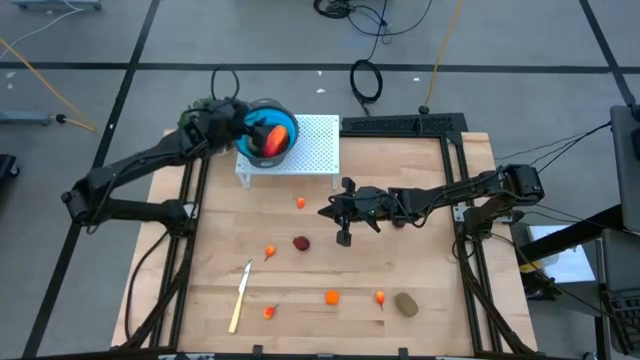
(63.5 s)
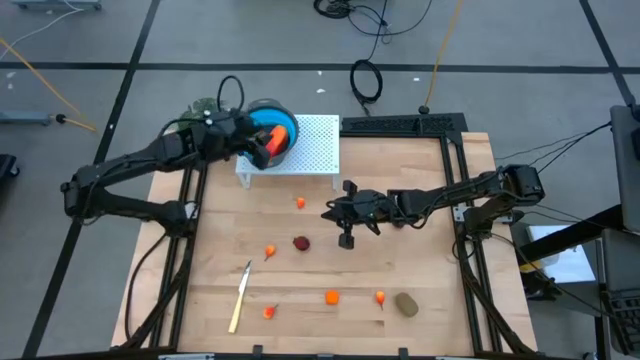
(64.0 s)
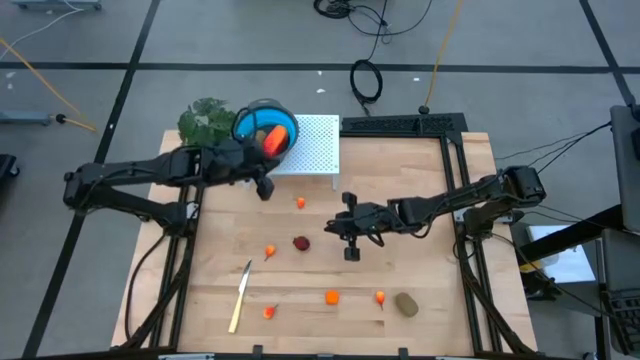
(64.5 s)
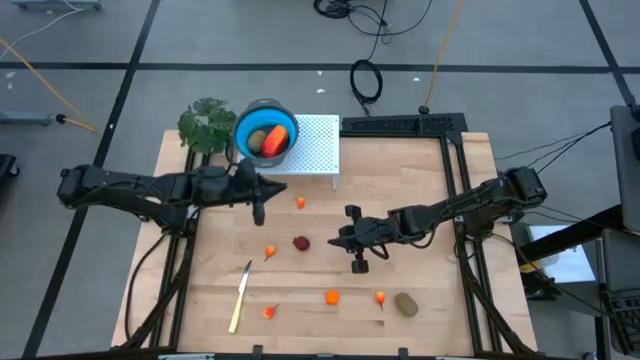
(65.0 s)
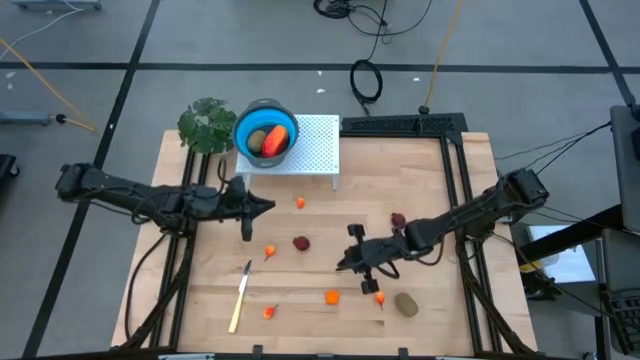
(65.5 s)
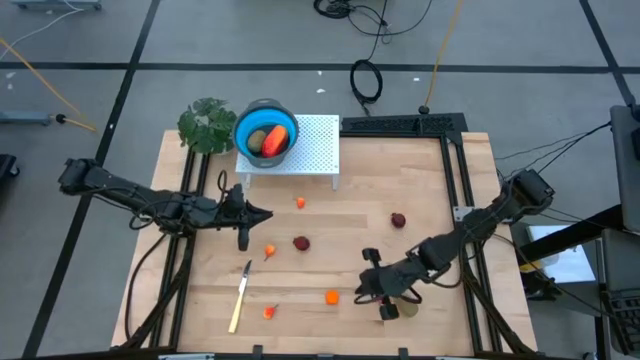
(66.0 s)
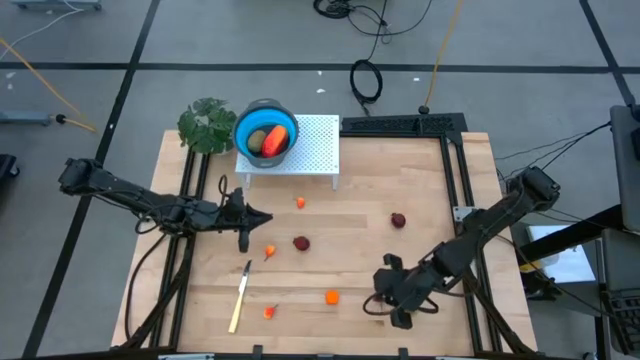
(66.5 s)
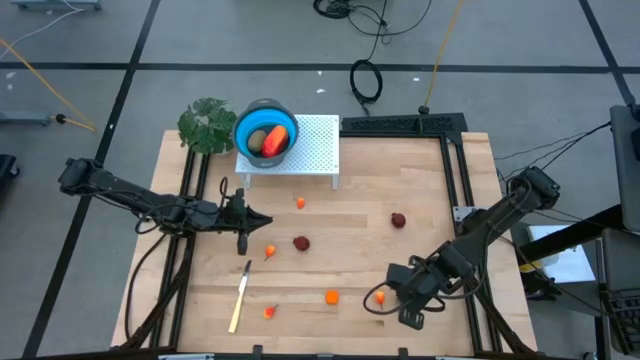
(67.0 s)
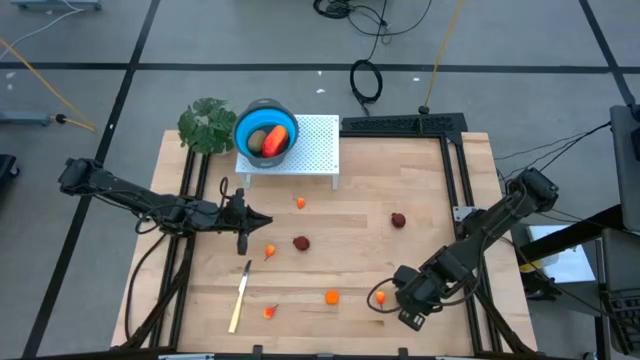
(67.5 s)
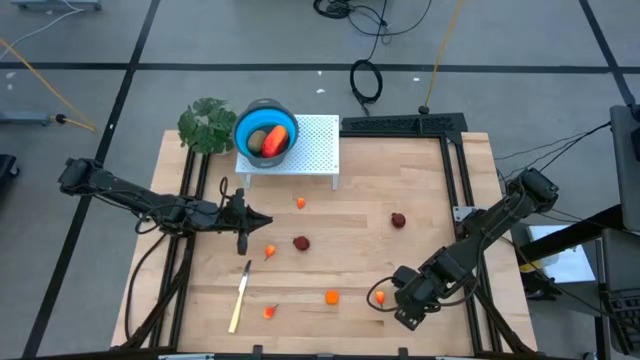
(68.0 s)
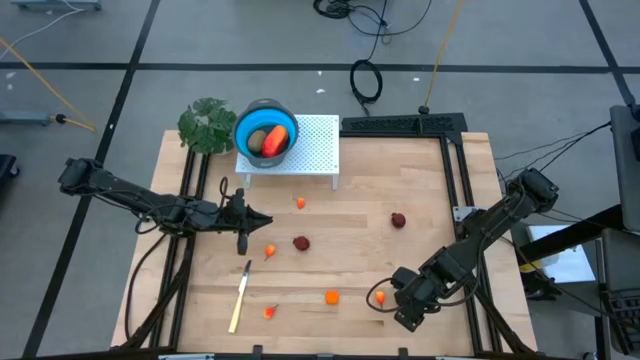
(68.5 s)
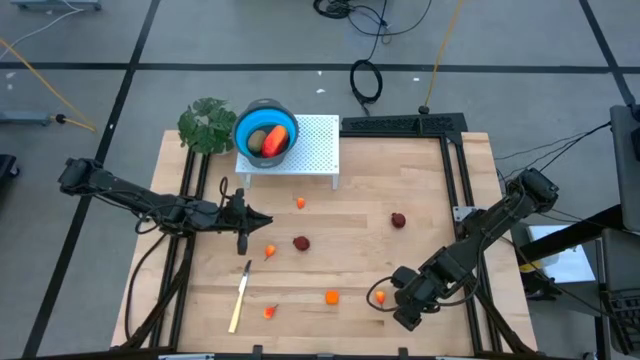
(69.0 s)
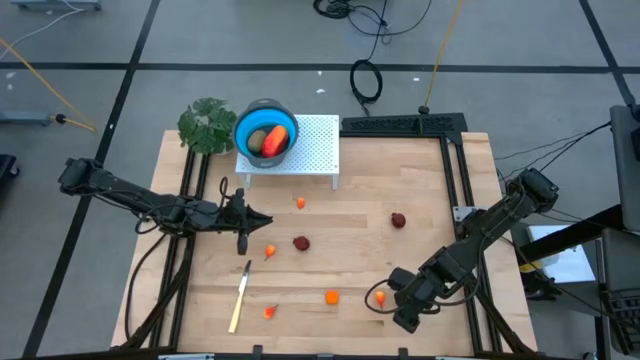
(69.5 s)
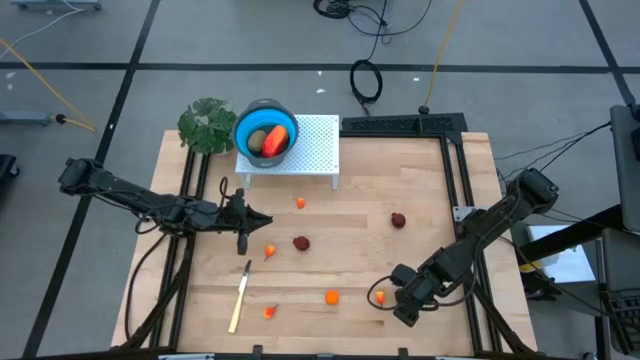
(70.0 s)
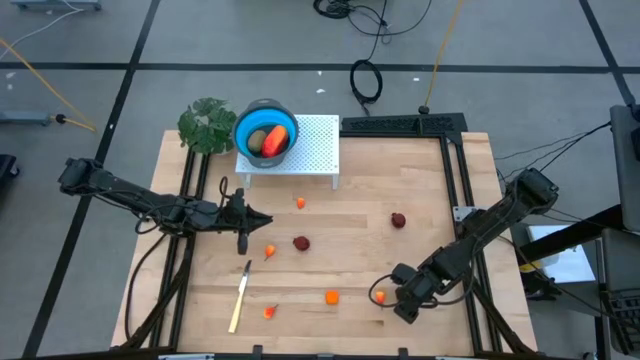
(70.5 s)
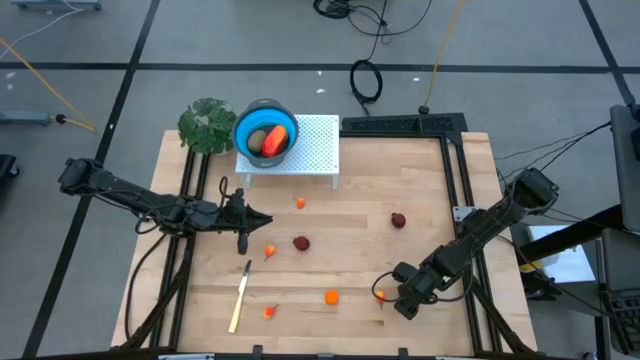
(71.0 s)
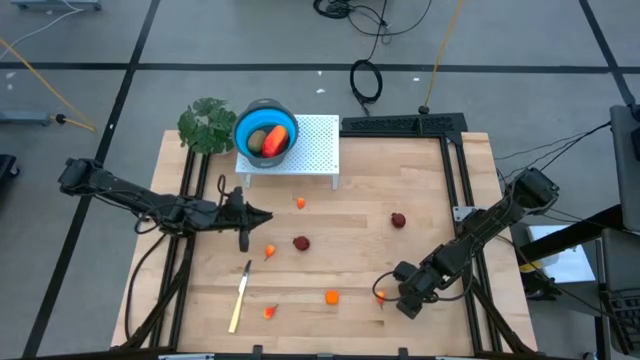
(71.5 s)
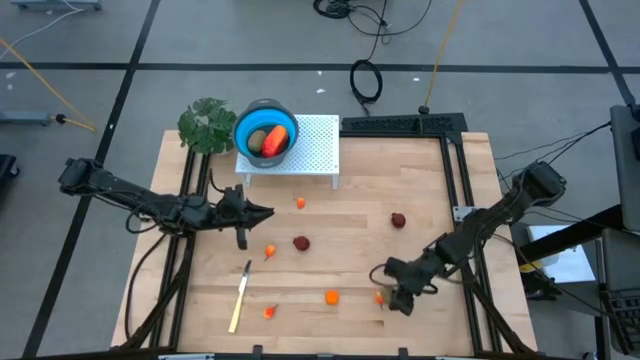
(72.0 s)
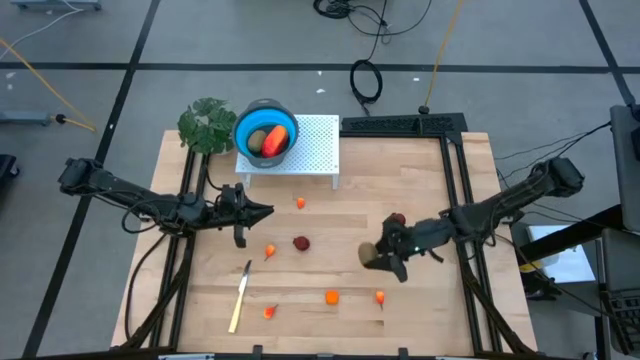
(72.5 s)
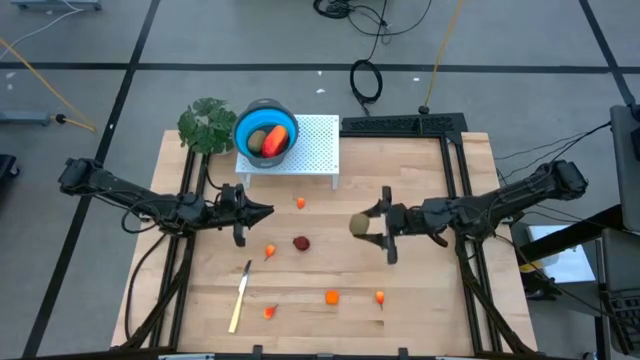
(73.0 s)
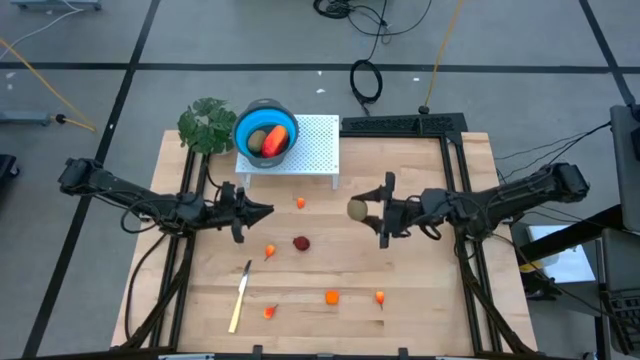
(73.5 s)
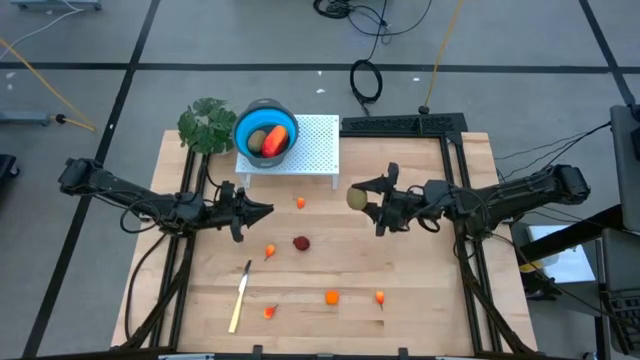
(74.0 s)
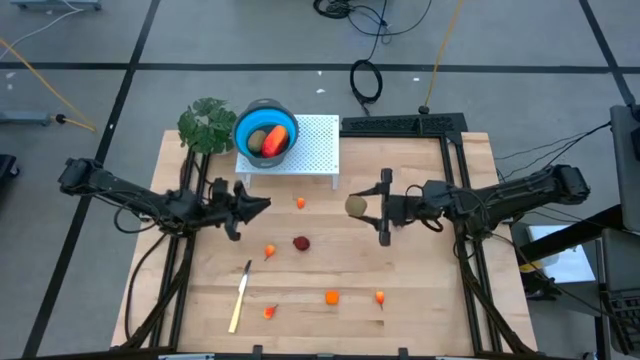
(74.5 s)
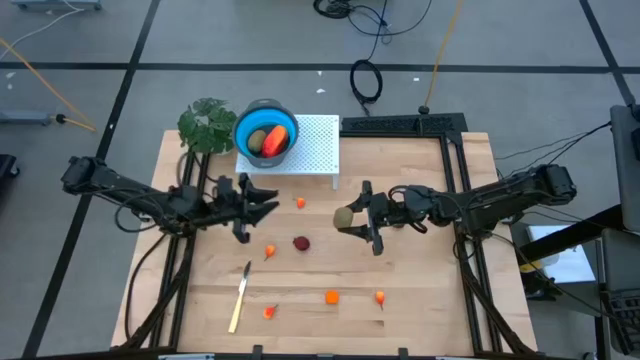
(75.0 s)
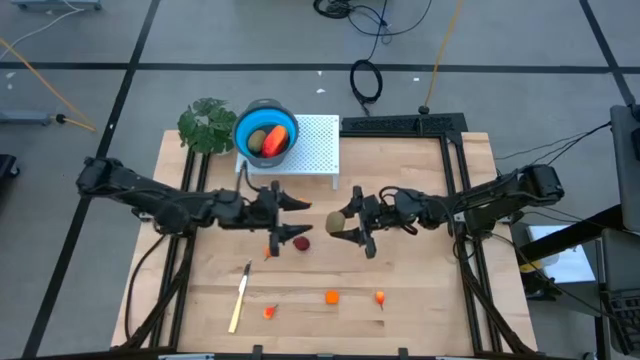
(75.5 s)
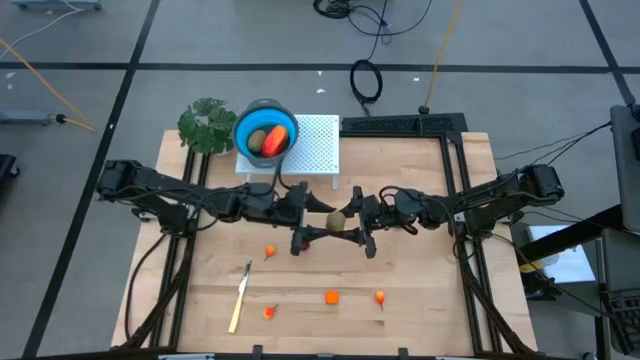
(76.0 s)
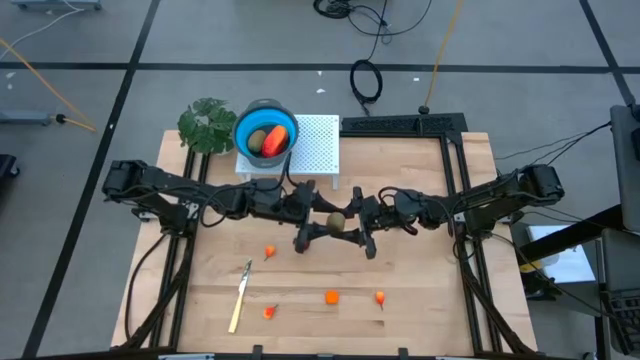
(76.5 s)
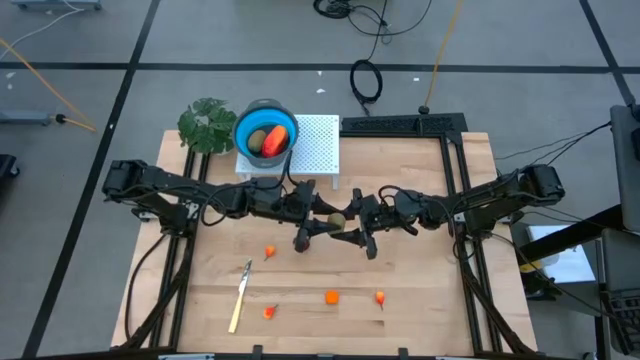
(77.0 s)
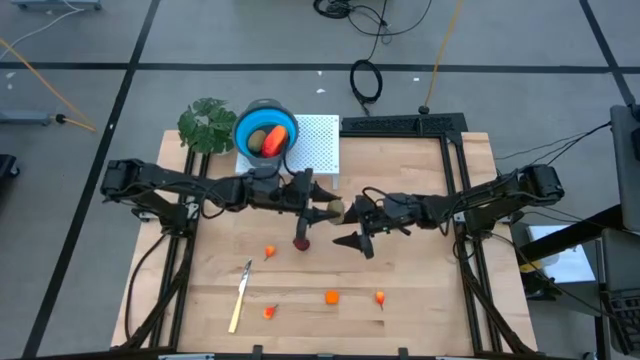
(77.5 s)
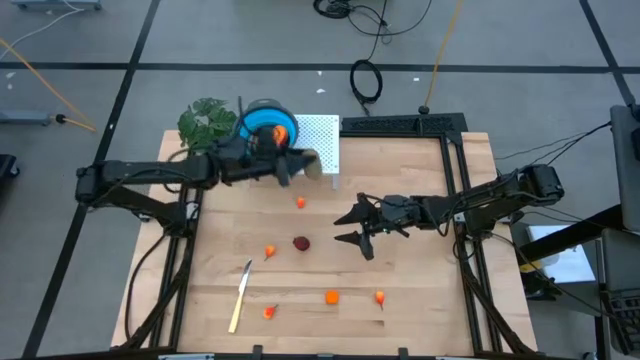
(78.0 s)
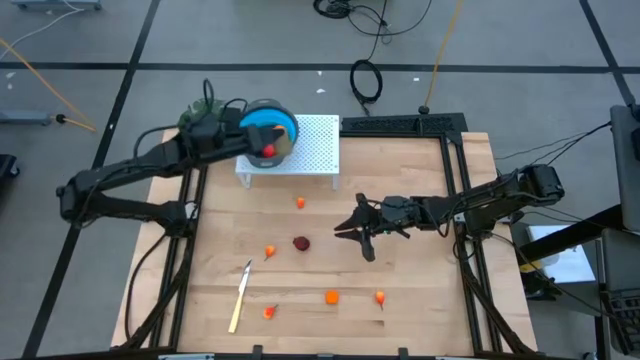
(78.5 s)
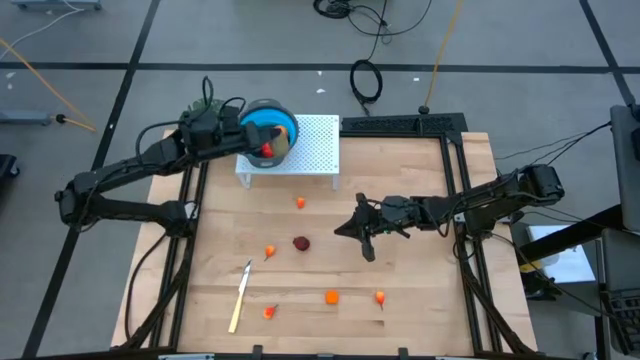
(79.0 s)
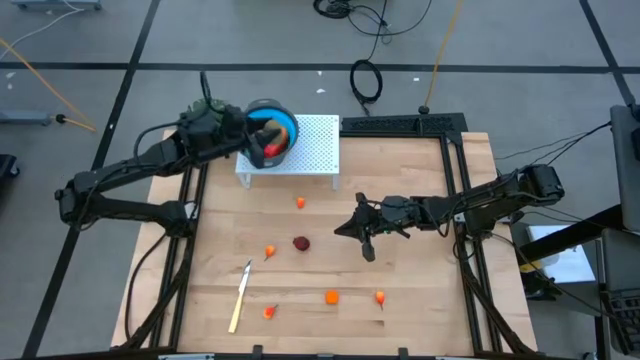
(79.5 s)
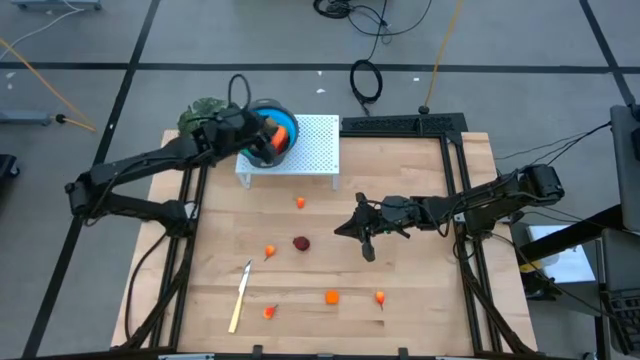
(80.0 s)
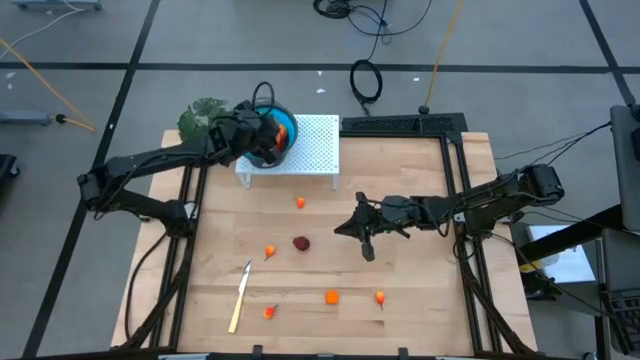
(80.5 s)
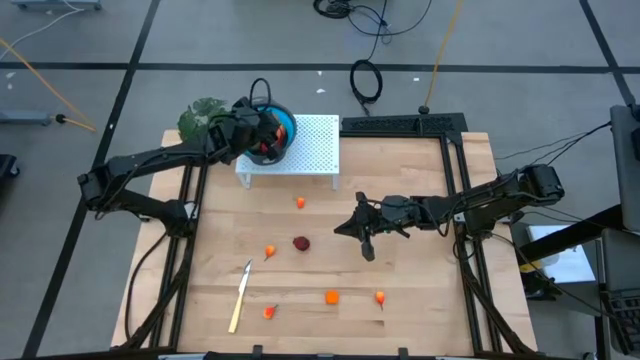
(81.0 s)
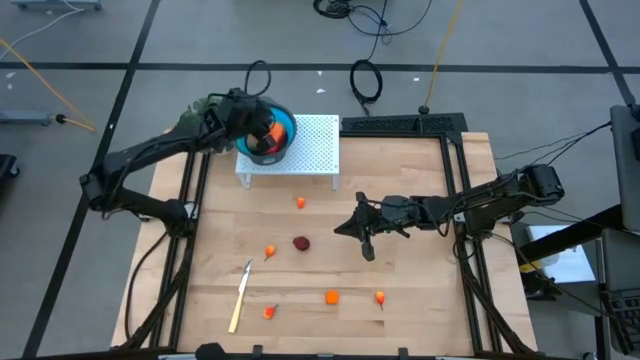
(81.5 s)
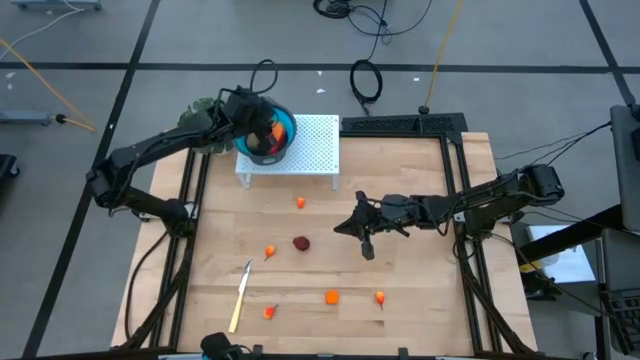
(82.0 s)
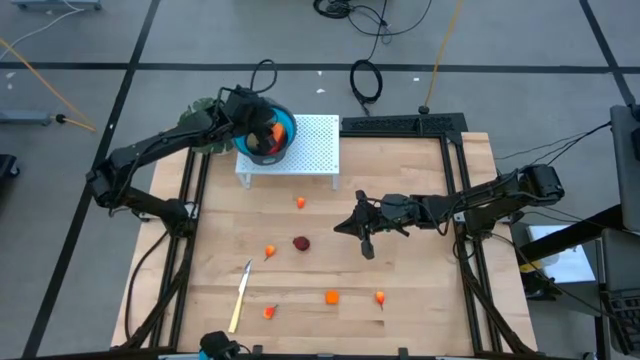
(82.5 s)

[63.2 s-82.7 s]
Task: Pick & Place Fruit
Put the kiwi into the blue strainer bowl on the shelf

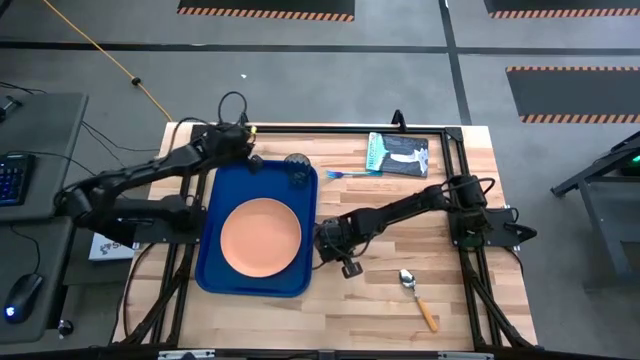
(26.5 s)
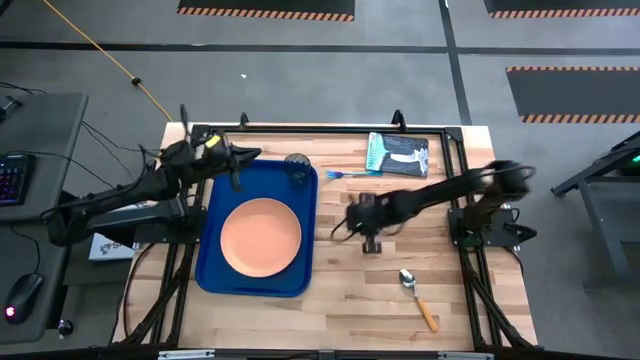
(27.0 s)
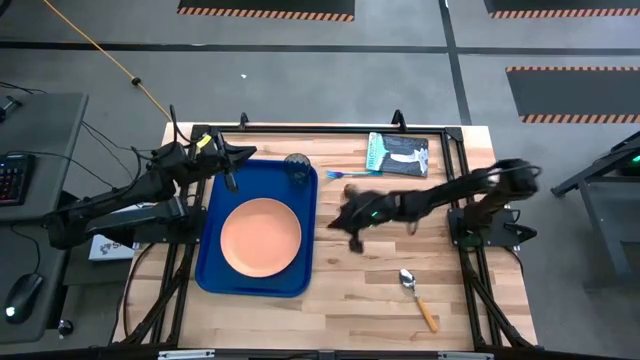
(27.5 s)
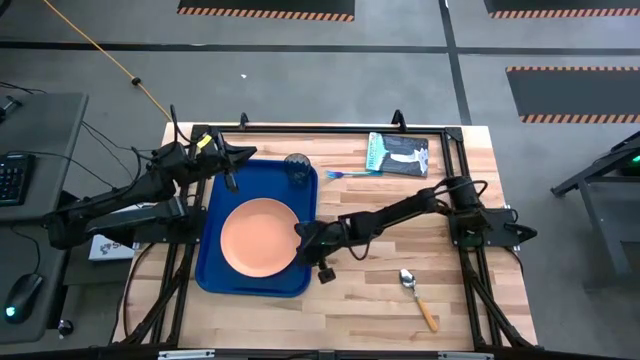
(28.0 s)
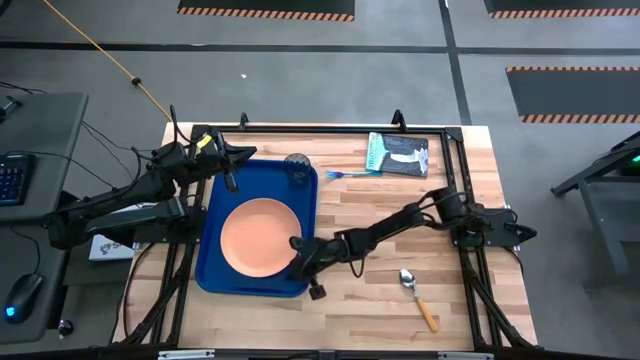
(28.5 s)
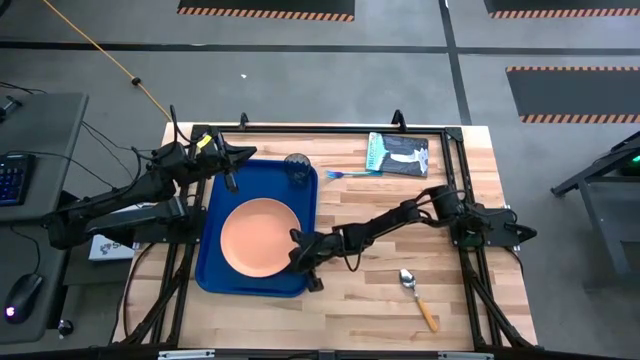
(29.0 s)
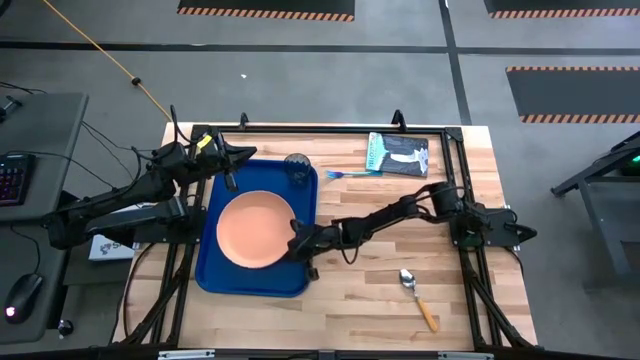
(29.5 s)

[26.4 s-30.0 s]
Task: Pick and place plate/cup/fork/spoon on tray
Adjust the light orange plate on the blue tray
